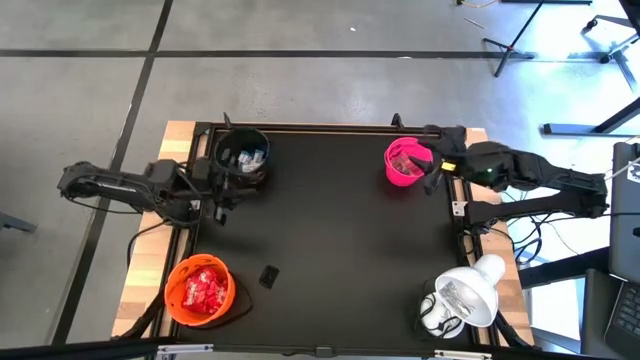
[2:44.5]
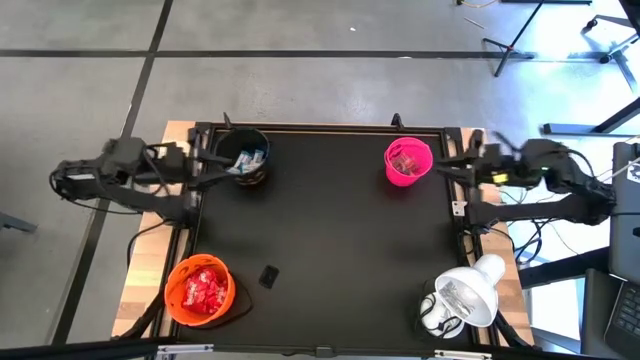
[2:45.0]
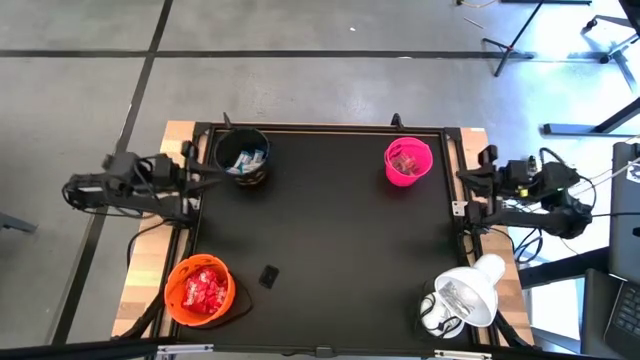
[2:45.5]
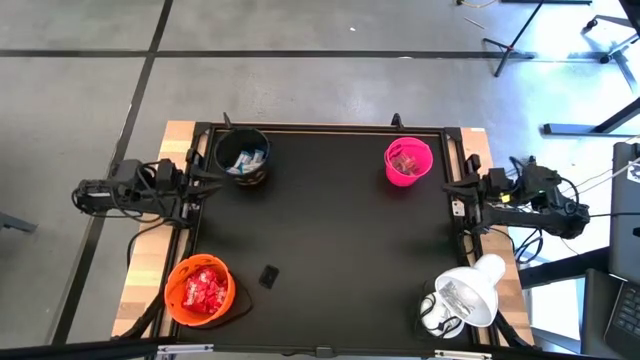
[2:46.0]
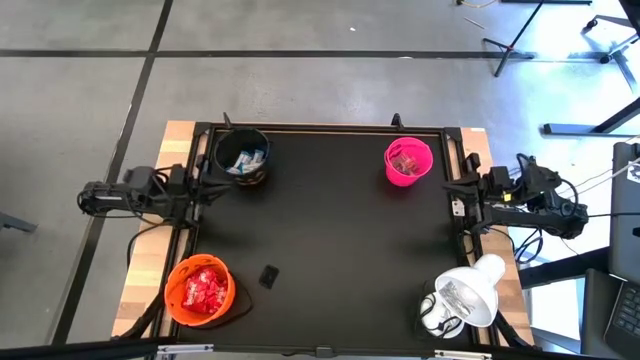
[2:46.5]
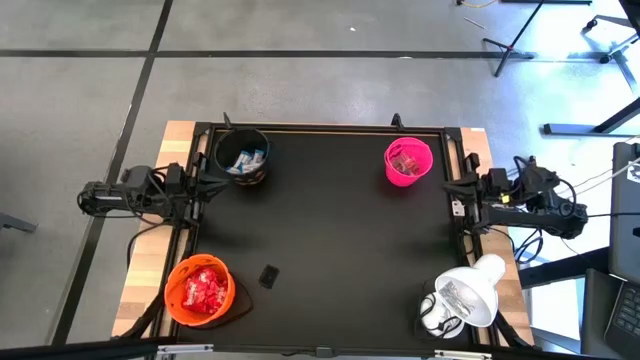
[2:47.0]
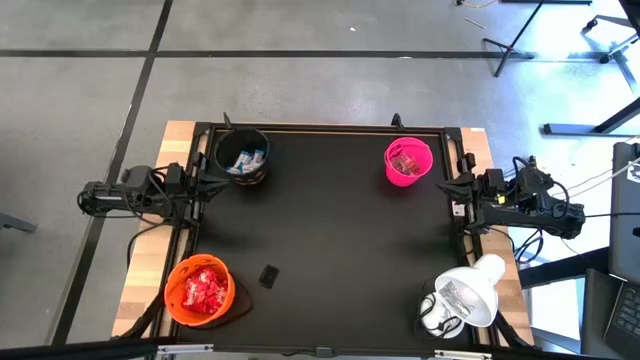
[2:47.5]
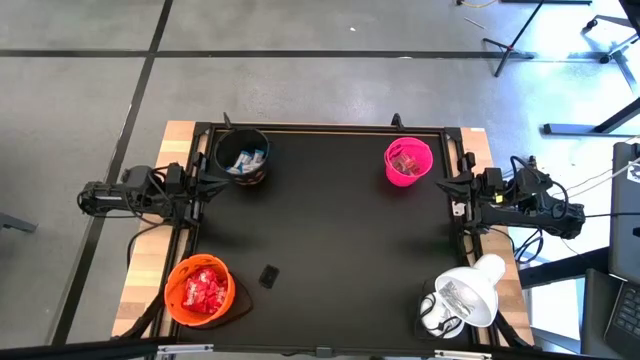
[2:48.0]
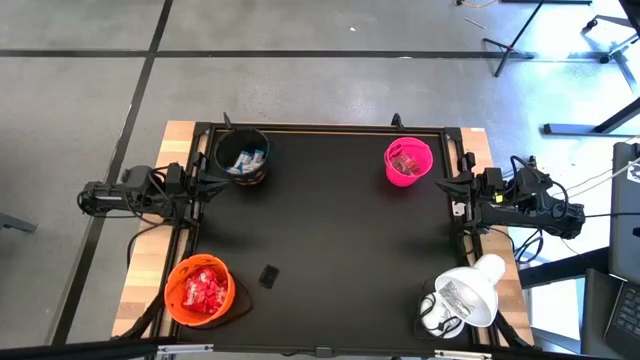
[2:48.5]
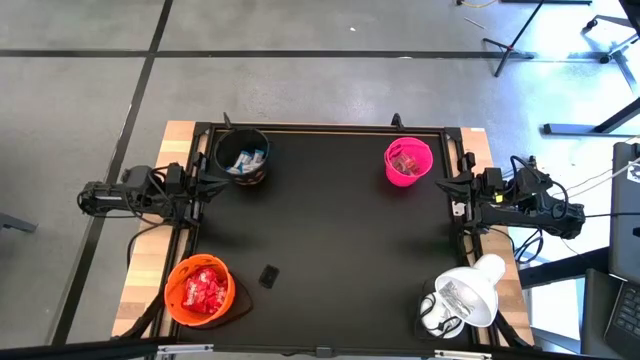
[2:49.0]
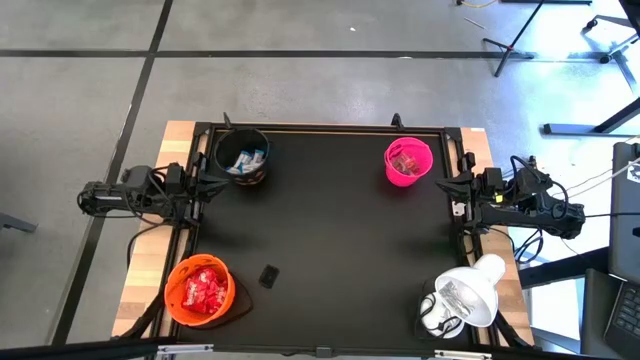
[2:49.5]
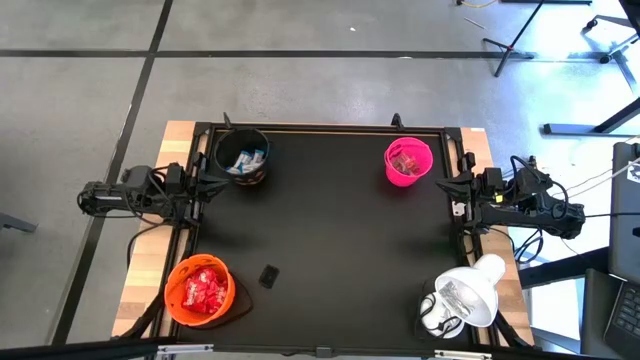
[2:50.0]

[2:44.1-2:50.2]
Task: Sort candy
Return to Home Position

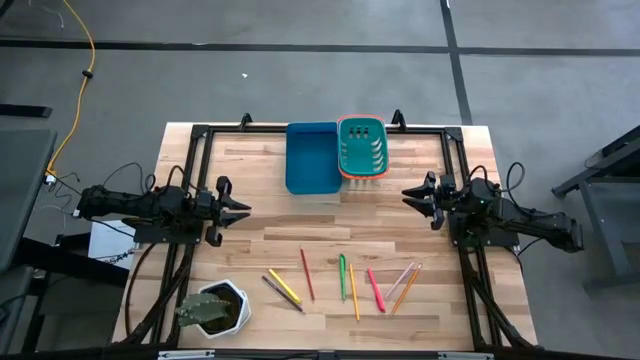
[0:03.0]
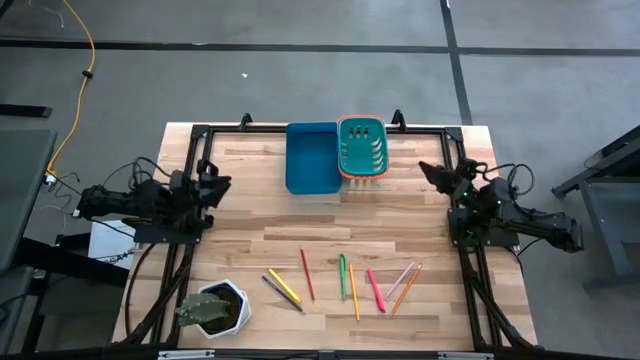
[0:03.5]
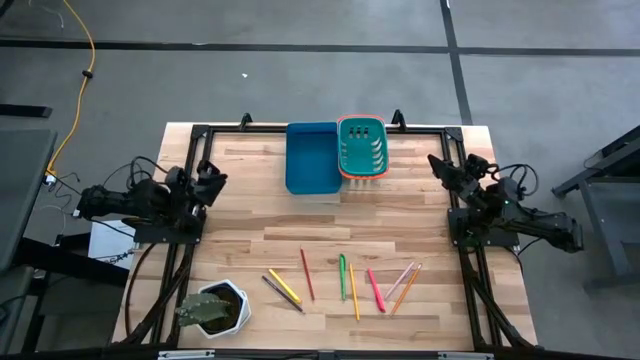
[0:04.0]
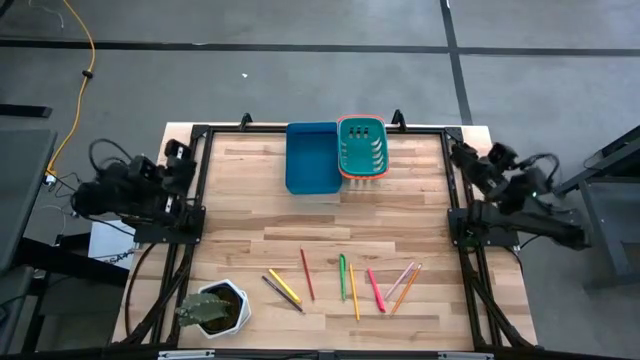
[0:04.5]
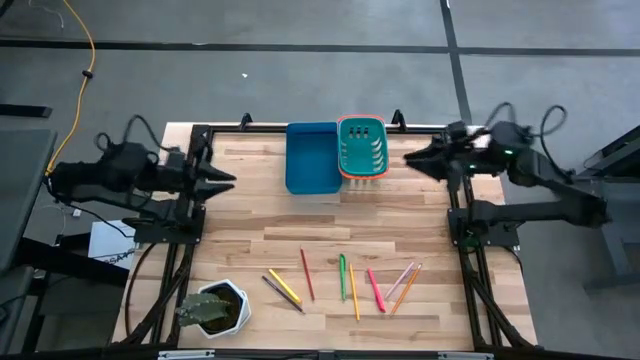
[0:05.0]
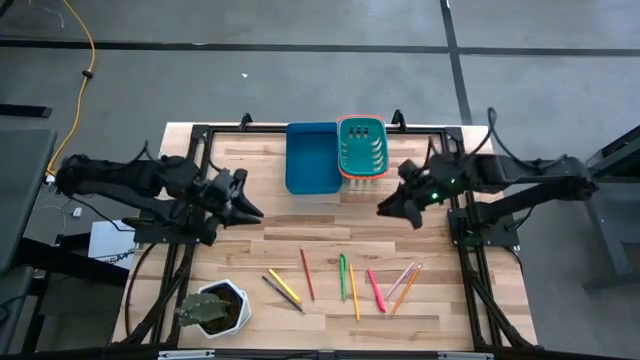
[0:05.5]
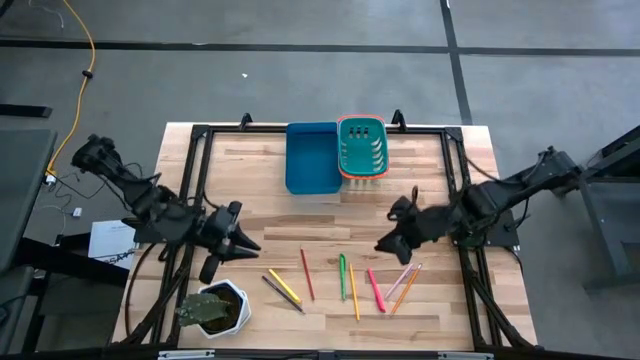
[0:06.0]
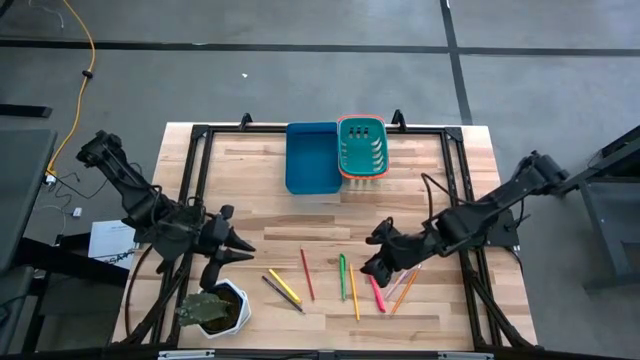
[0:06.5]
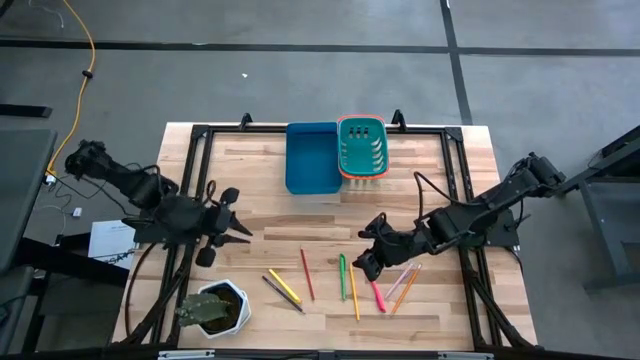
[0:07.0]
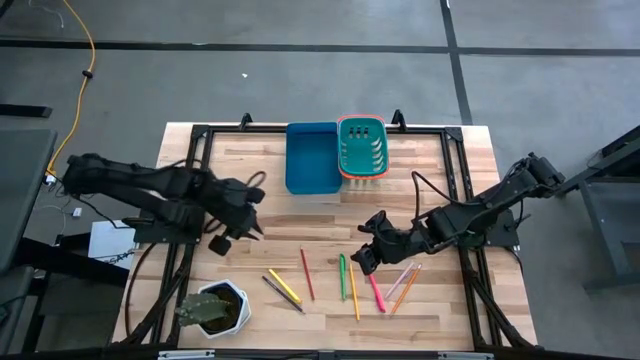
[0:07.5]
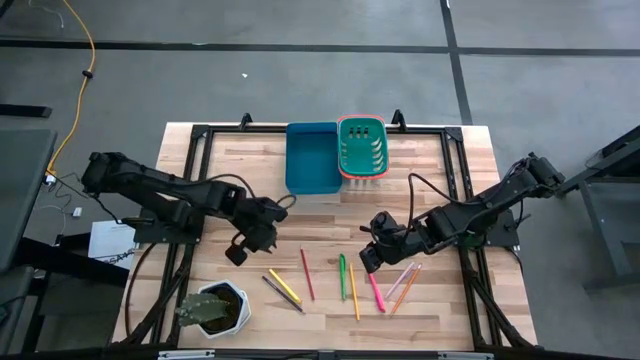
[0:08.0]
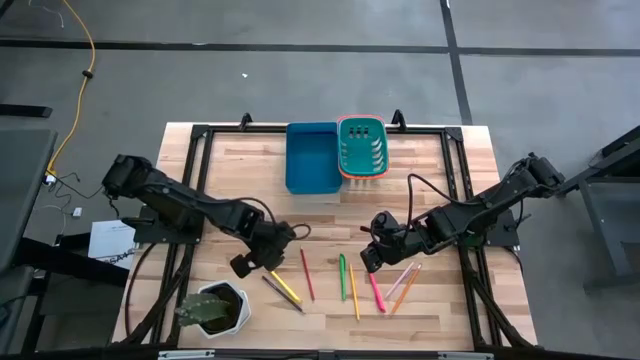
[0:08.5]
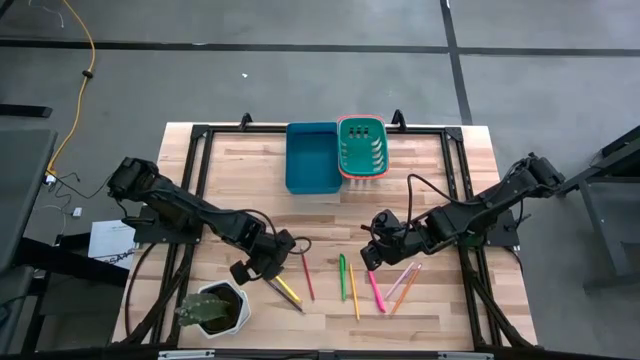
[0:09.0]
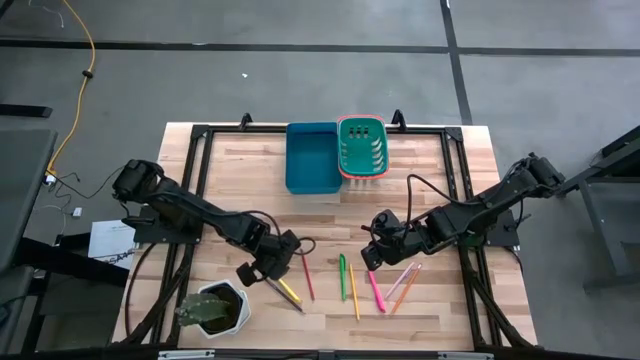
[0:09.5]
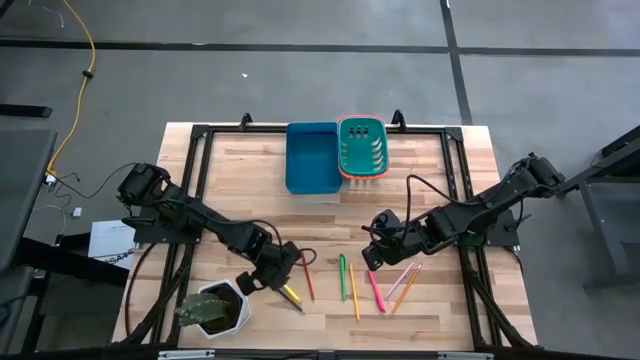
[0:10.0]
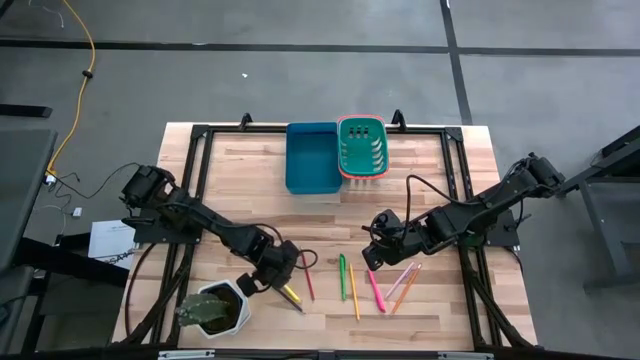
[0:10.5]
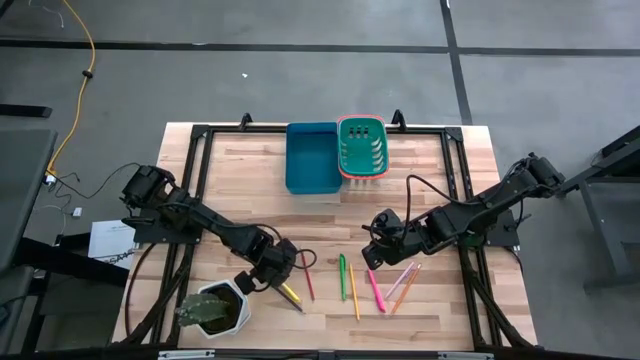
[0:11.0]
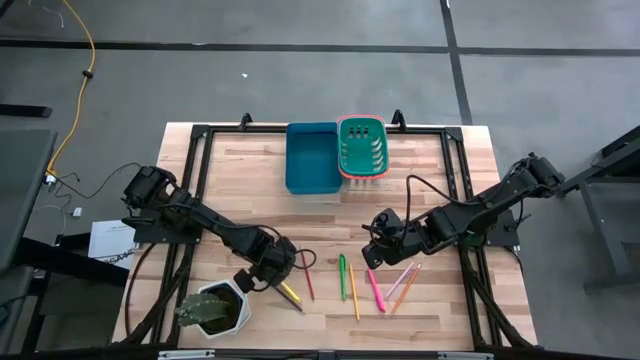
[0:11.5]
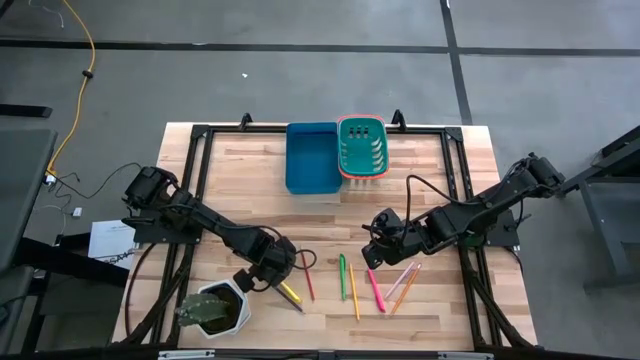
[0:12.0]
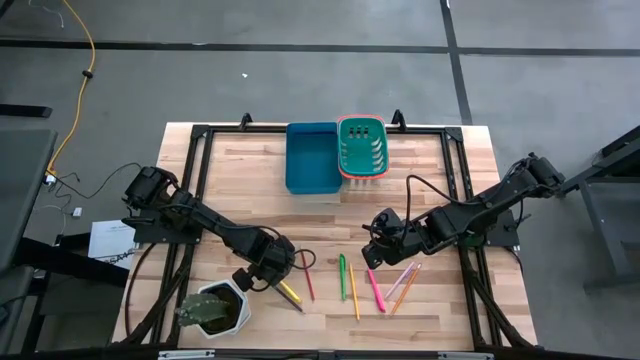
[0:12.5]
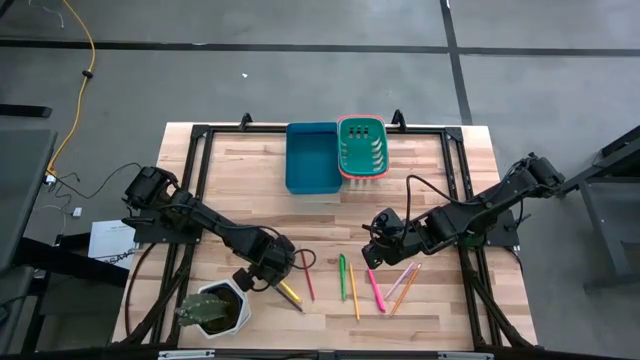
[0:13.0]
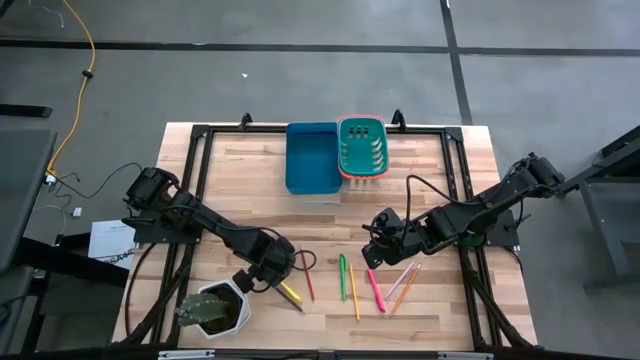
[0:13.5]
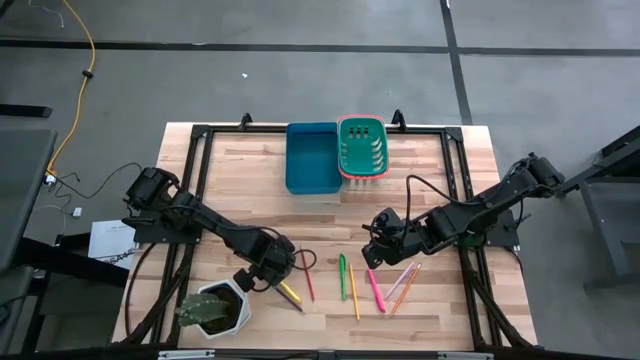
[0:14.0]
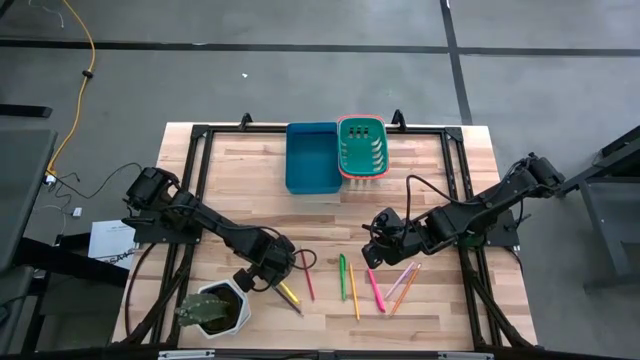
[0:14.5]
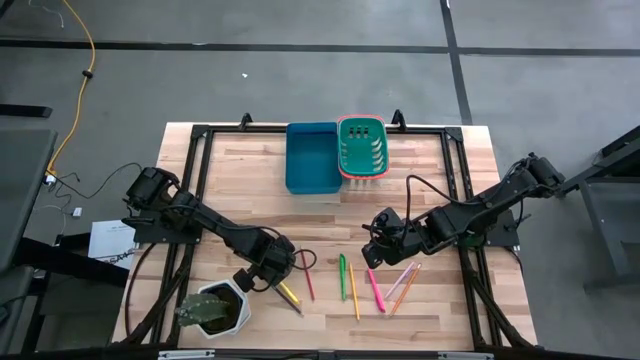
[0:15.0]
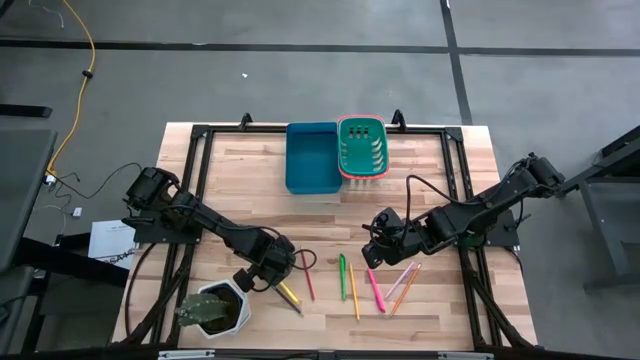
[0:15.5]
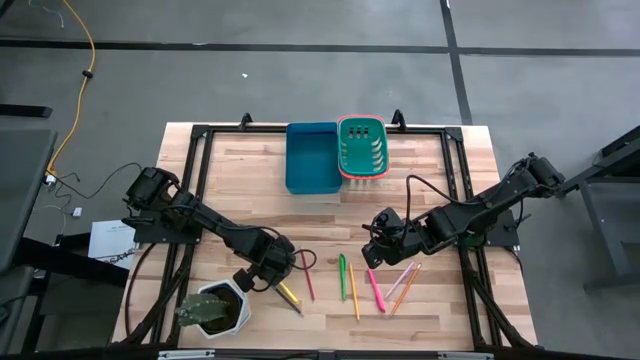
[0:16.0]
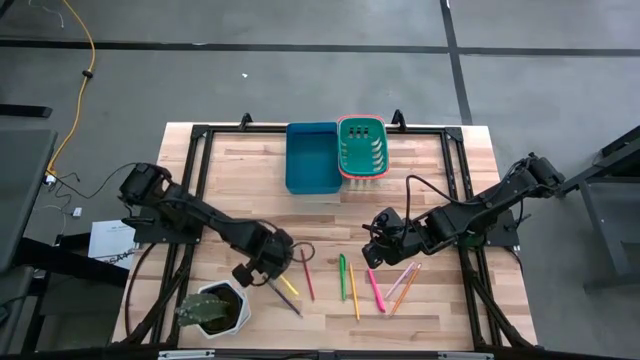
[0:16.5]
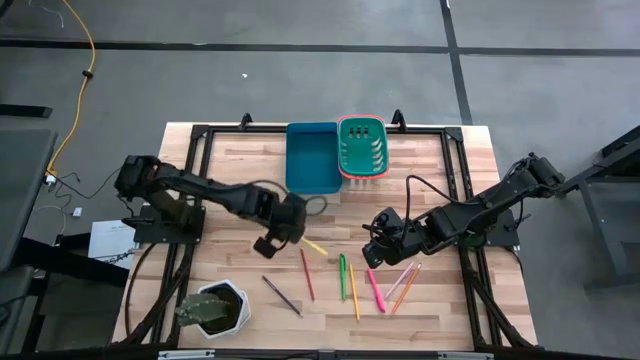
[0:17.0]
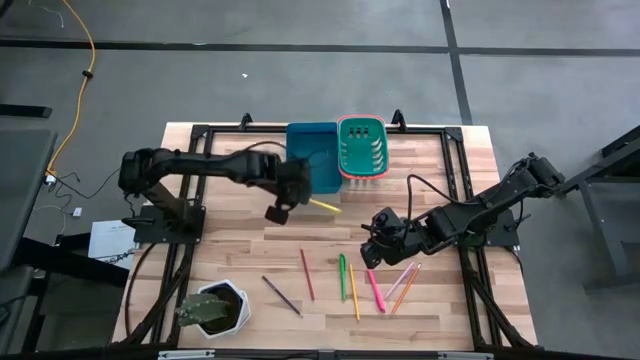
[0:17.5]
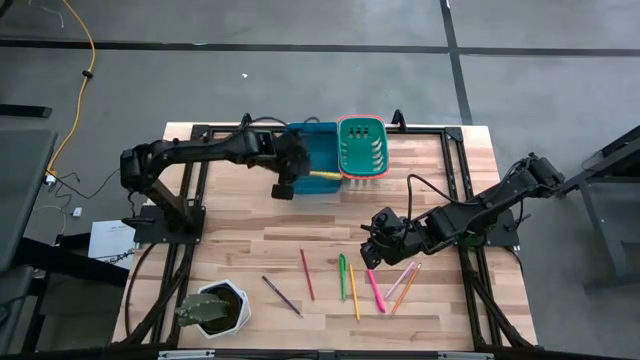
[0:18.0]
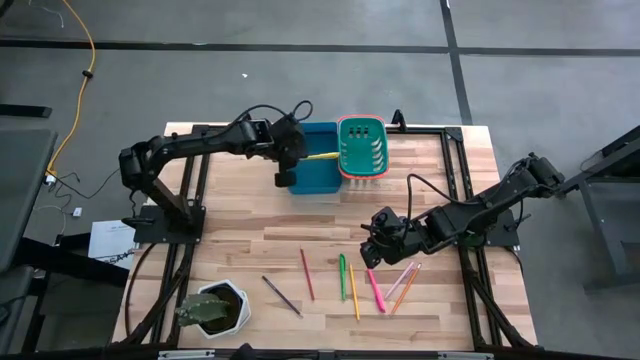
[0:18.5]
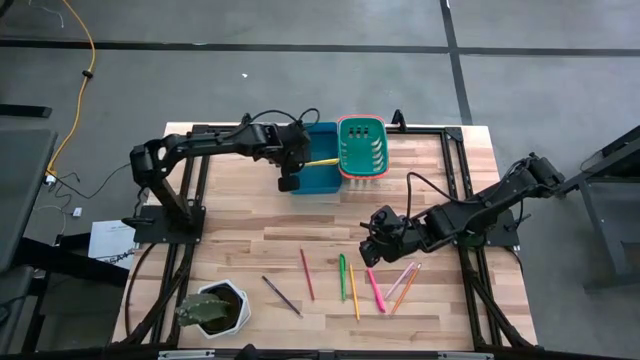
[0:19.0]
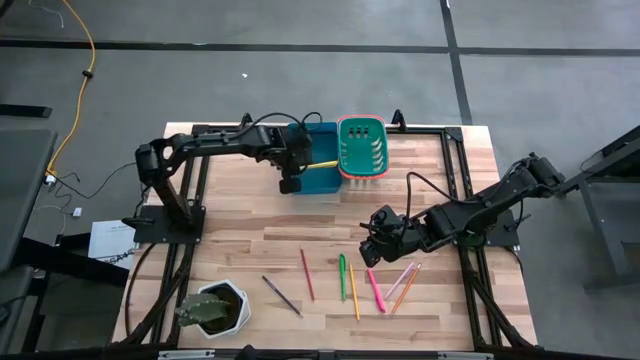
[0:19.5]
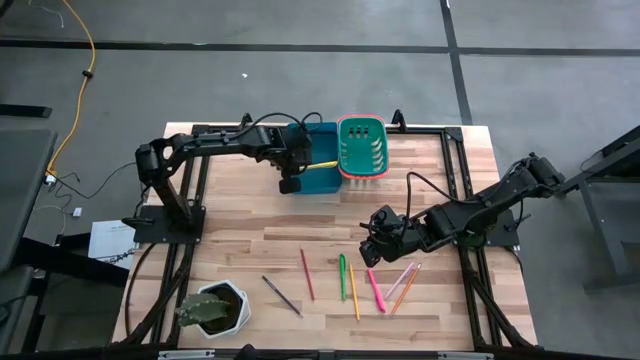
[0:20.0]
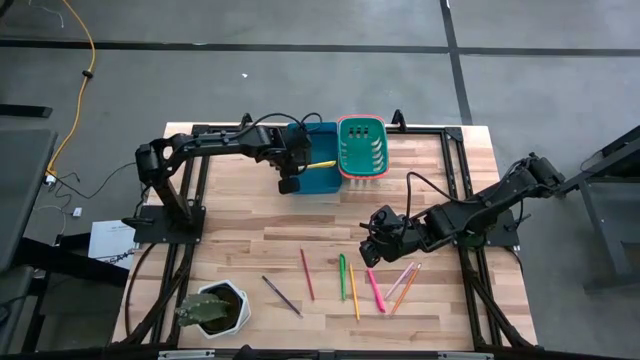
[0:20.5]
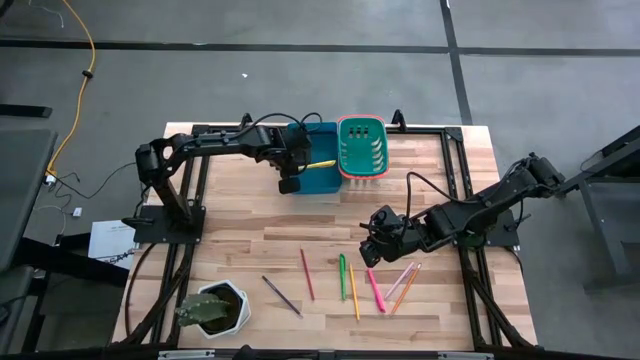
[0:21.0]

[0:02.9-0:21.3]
Task: Sort pens & pencils
Put the yellow pen into the blue bin
